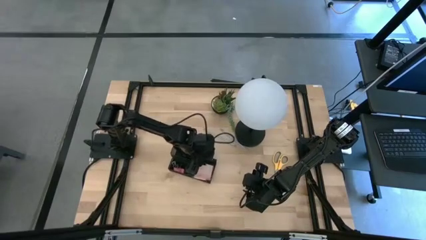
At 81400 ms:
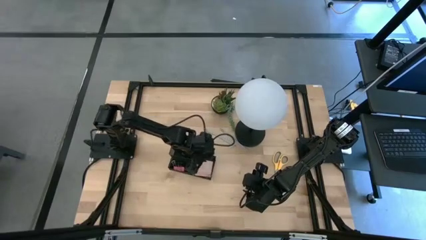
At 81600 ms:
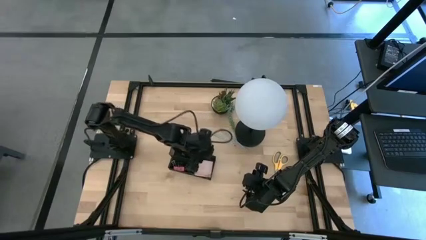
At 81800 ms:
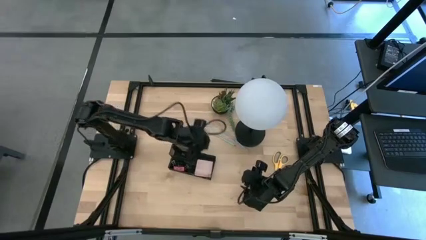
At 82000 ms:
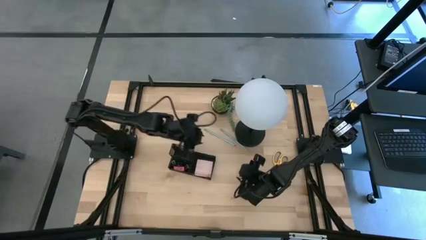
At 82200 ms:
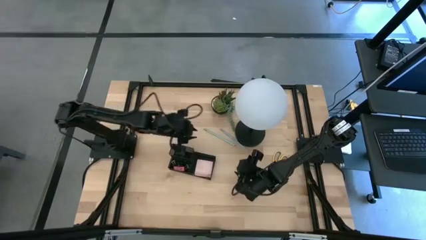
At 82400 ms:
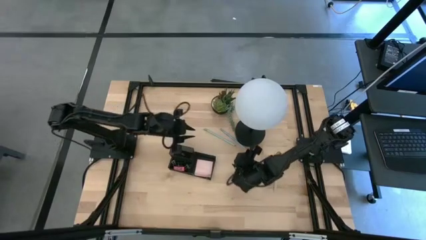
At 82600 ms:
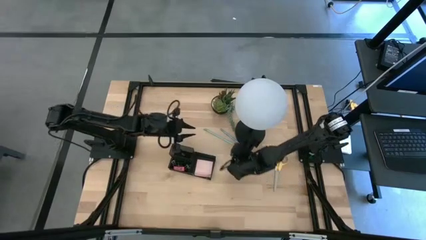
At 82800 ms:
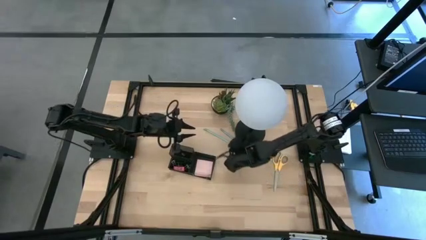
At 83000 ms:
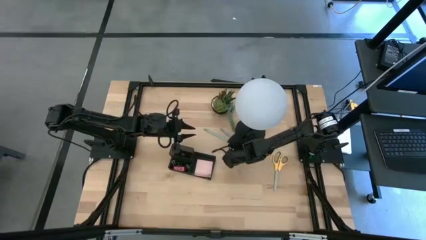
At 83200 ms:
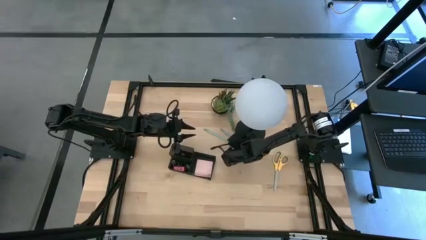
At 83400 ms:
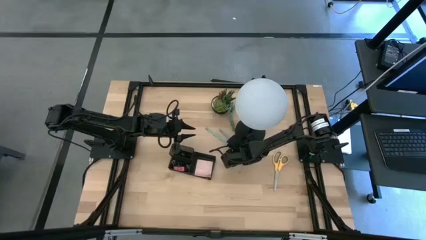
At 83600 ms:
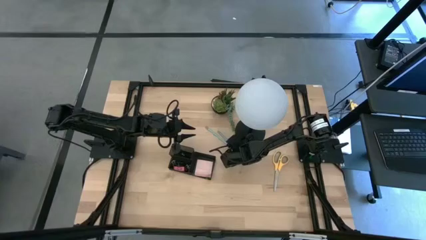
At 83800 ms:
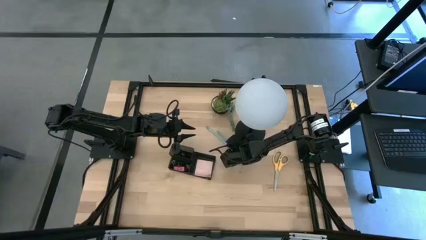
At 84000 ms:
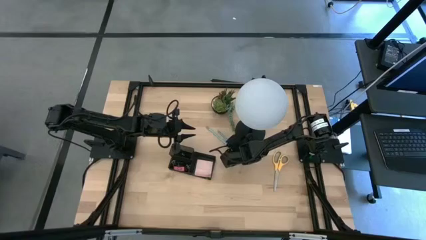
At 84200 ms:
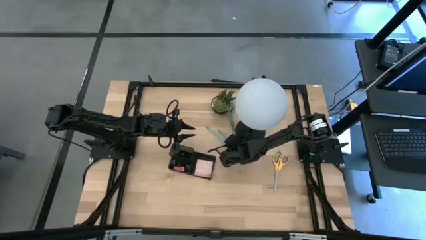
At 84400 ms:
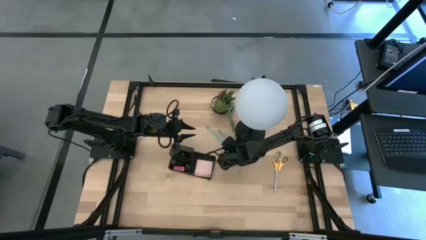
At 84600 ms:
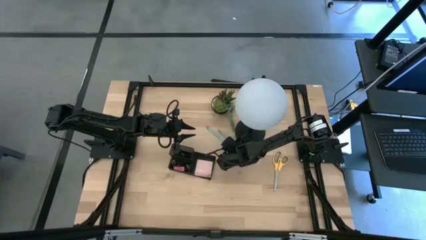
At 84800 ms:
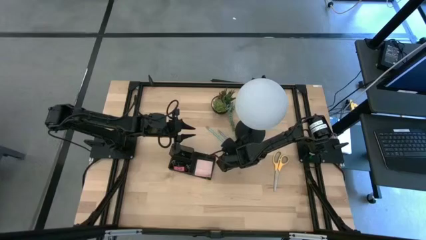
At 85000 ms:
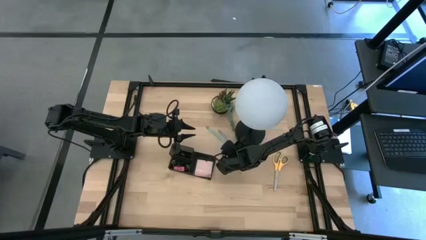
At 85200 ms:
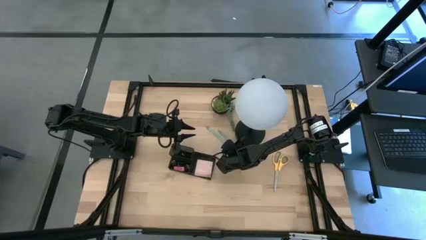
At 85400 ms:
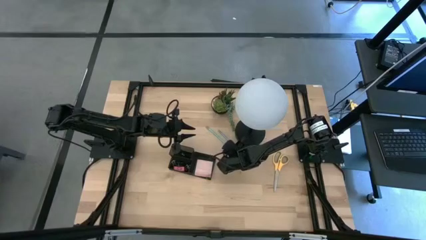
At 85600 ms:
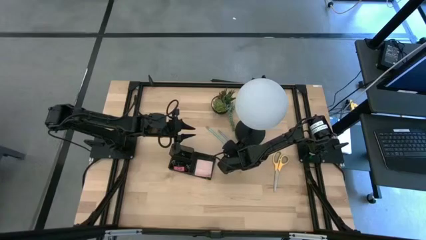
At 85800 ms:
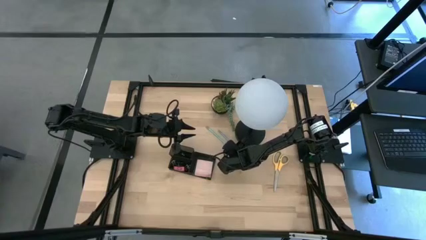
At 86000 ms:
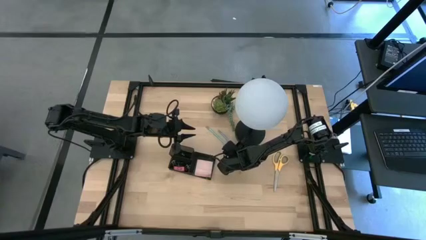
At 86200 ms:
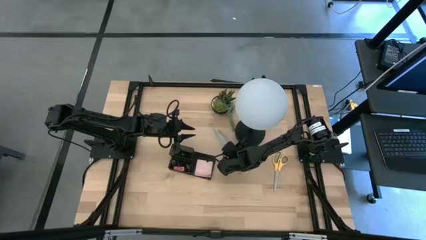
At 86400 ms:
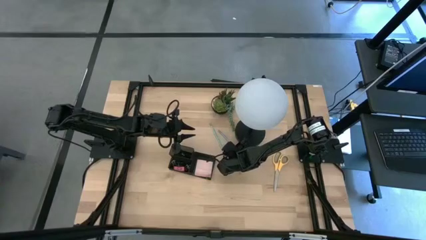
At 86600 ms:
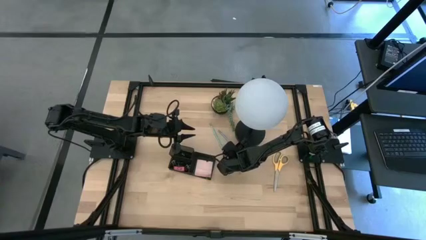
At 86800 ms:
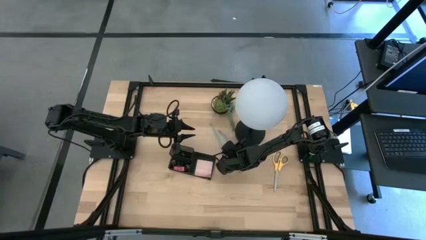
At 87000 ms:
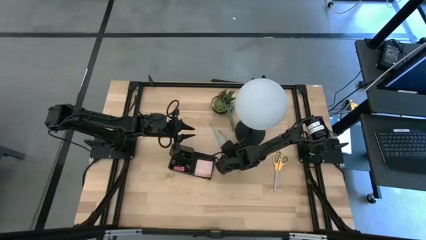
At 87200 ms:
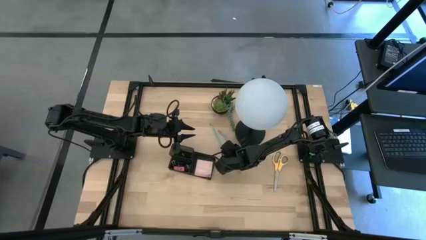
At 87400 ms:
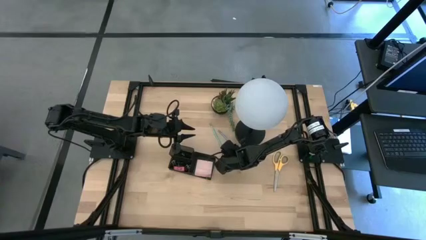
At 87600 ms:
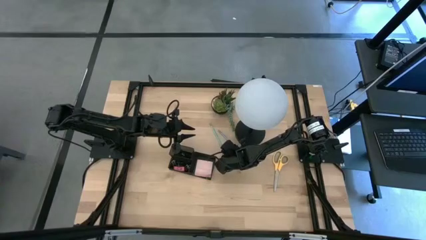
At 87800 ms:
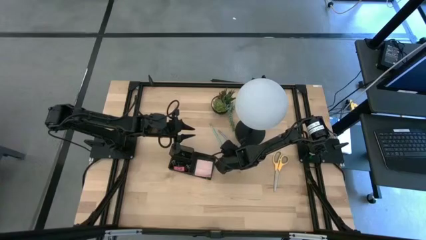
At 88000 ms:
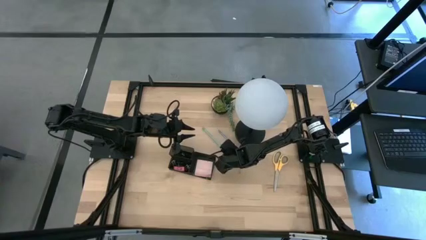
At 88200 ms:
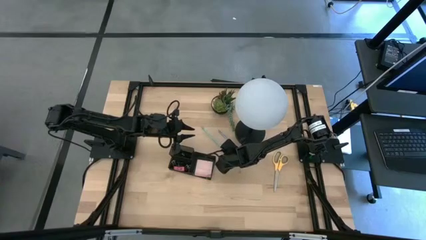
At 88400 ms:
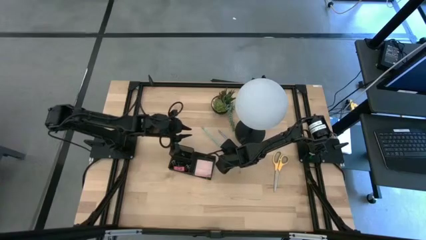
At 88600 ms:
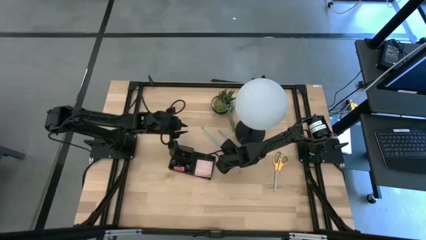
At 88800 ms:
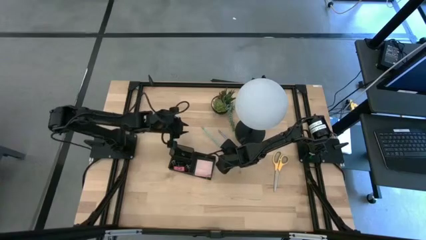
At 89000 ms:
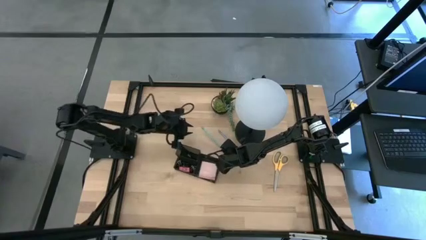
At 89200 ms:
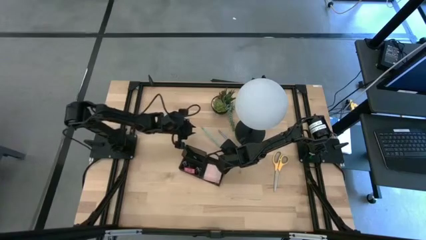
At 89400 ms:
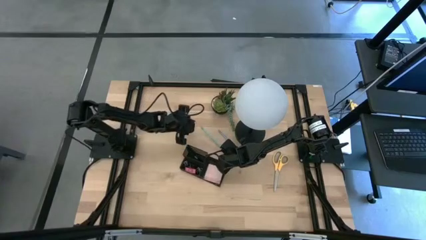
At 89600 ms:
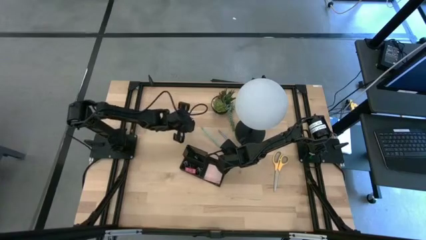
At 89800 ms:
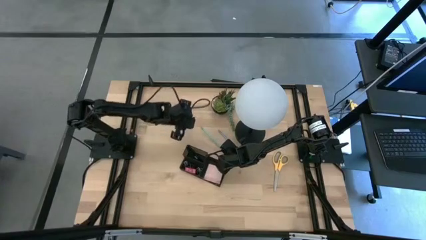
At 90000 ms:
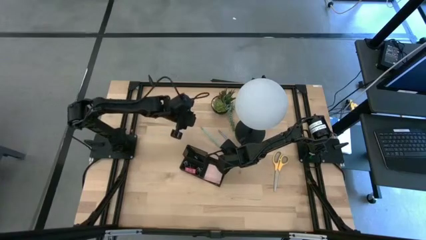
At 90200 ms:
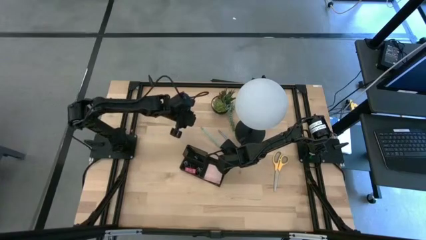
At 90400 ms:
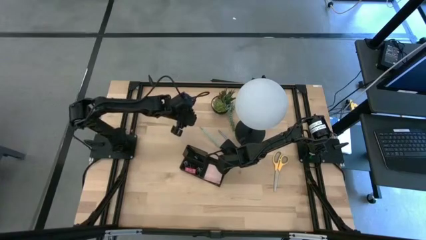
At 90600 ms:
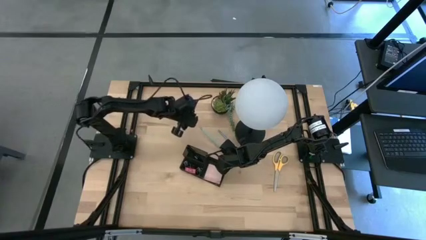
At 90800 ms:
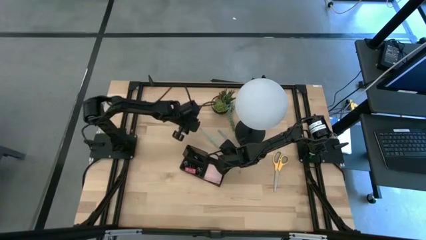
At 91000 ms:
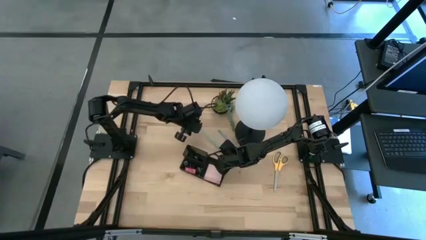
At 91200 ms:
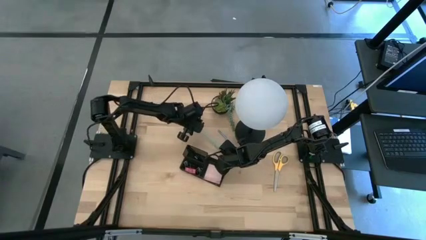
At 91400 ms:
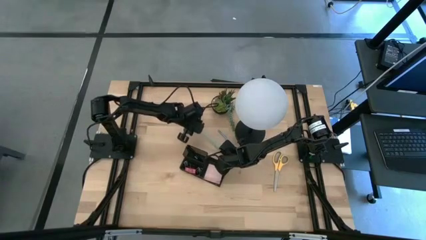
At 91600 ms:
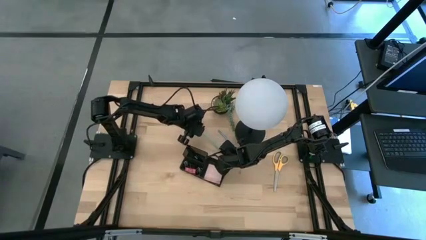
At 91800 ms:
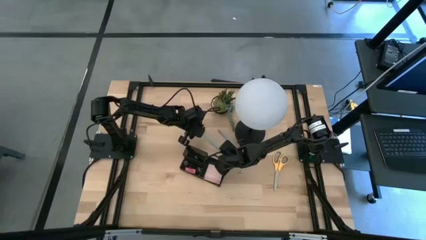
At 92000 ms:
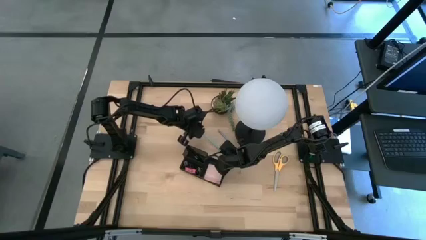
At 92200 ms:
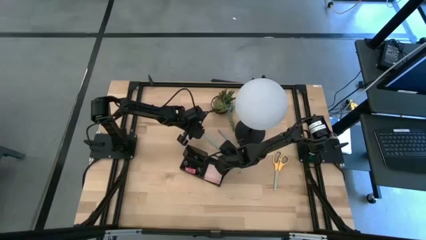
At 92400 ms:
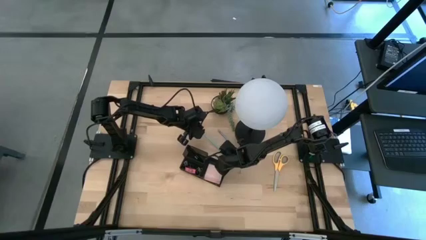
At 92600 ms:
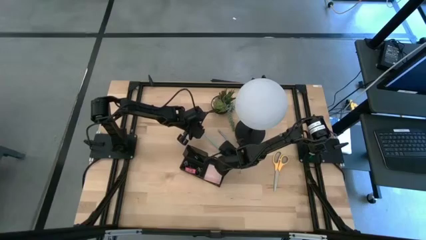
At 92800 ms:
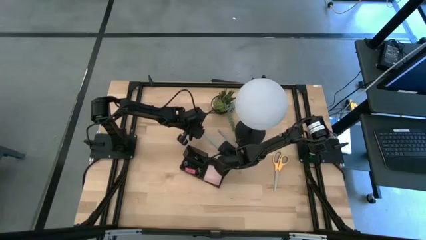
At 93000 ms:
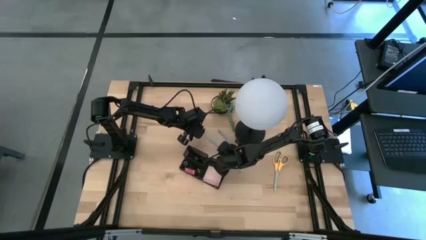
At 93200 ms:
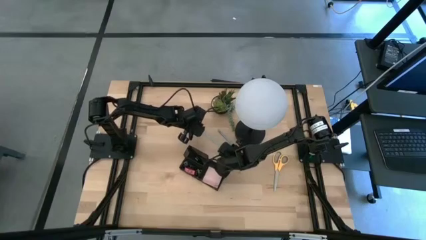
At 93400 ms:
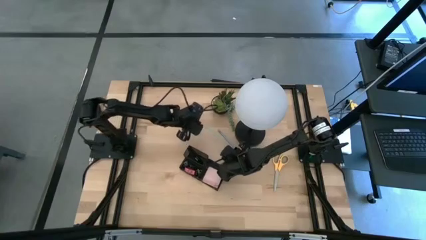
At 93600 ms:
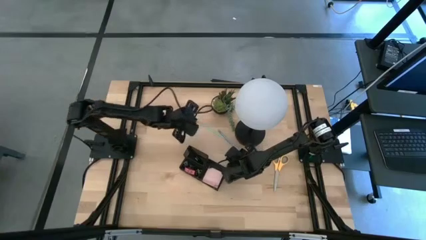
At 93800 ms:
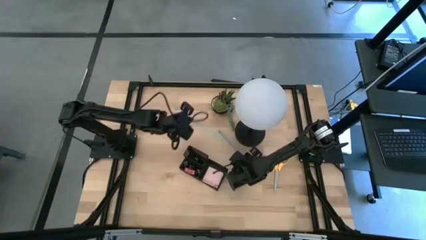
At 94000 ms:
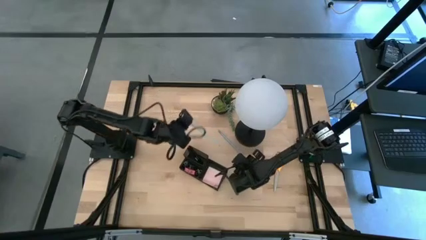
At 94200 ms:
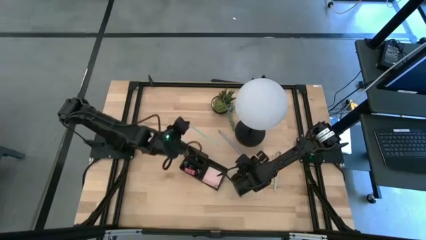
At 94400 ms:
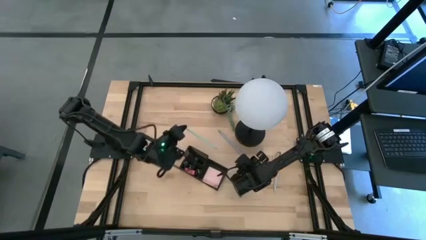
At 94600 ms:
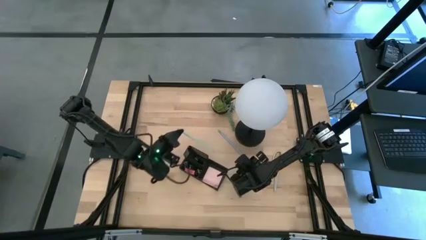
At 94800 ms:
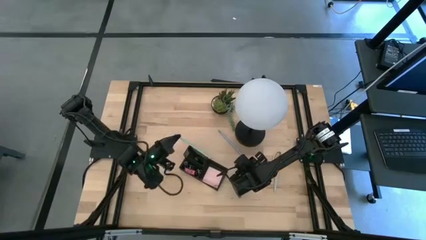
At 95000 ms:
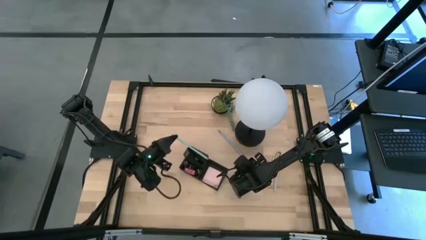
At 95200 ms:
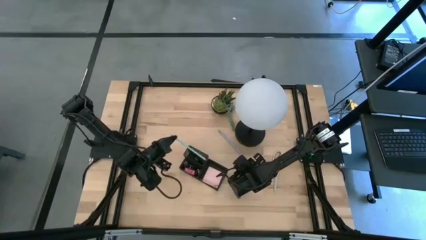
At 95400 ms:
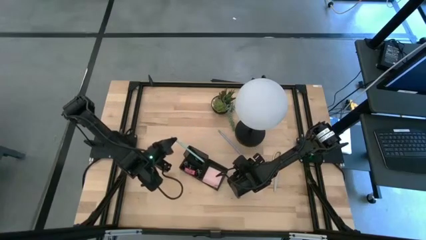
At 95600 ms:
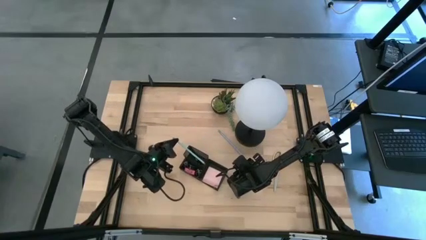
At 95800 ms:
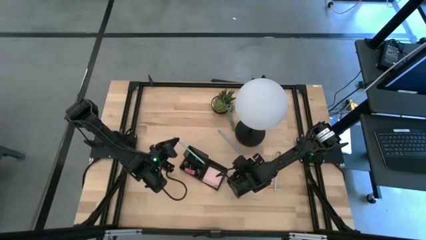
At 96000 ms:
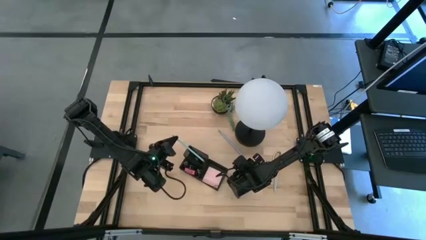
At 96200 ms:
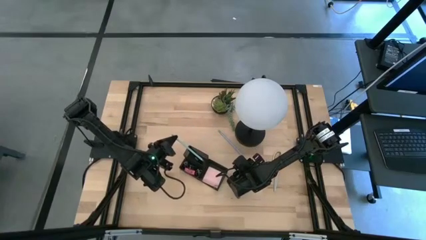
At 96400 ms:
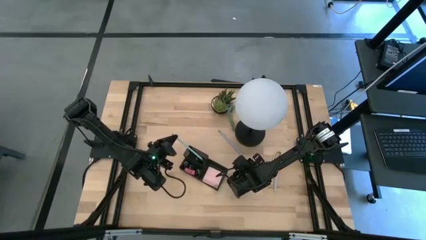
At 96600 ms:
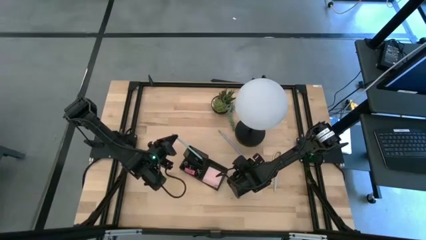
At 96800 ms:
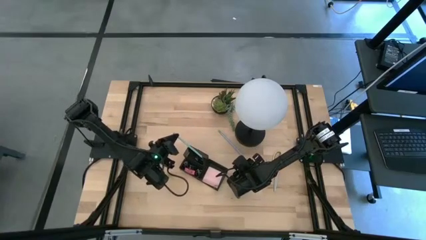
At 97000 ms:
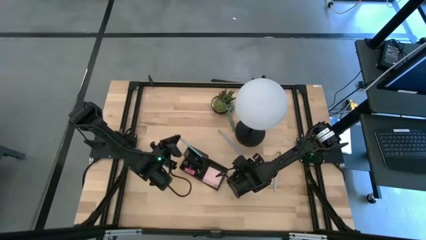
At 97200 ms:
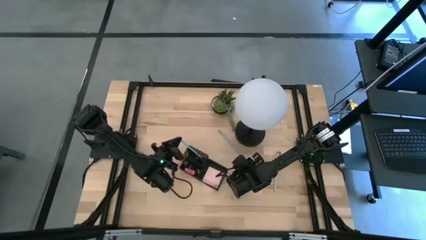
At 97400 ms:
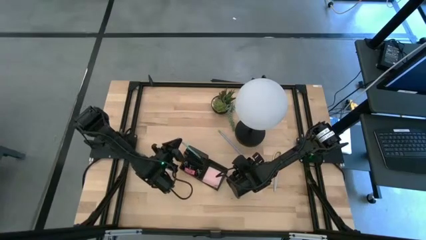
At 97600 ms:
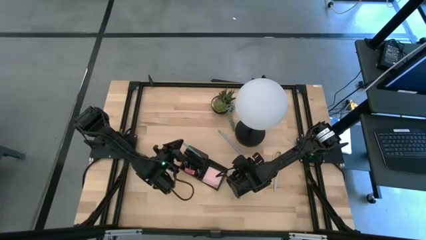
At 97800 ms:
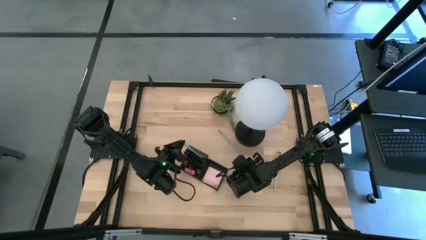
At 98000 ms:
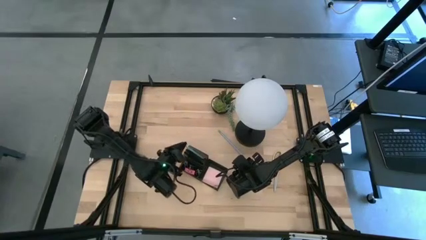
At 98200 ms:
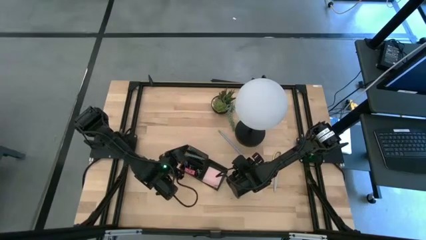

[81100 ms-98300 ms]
Task: Pick and place office supplies into organizer
Put the light blue pencil into the desk organizer
